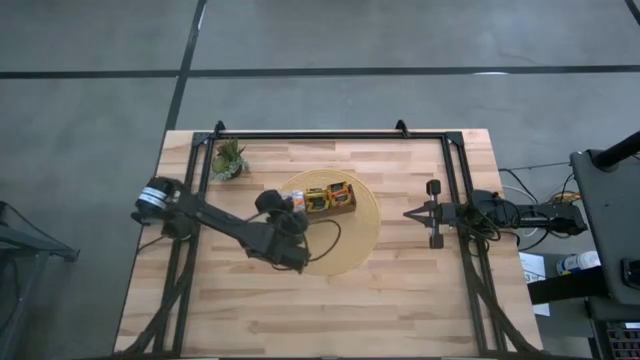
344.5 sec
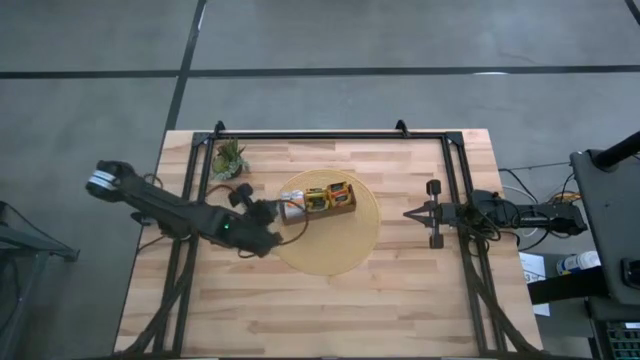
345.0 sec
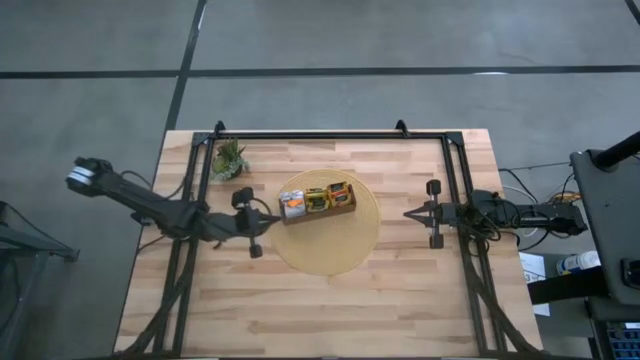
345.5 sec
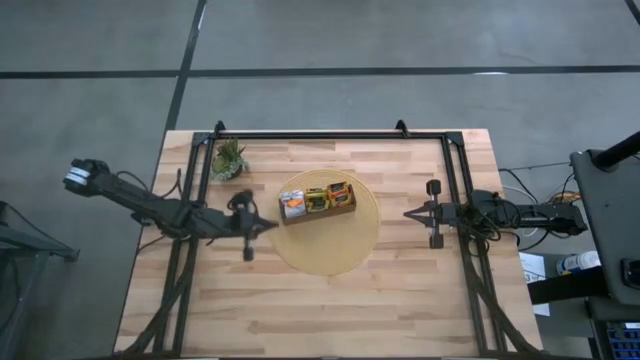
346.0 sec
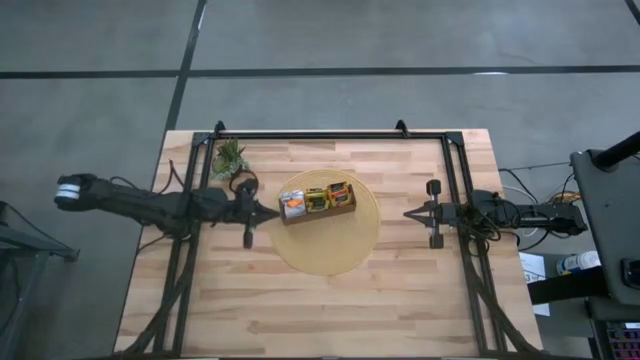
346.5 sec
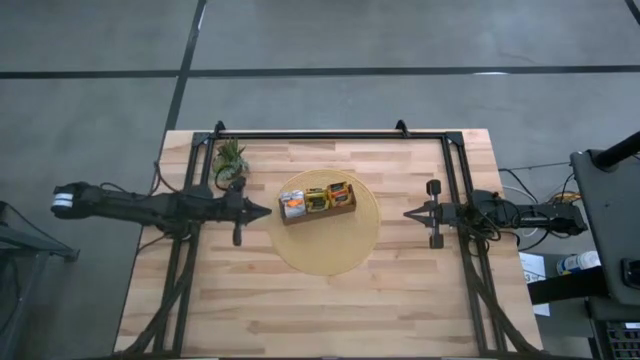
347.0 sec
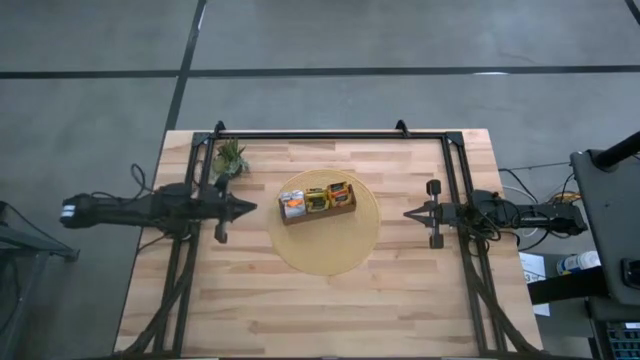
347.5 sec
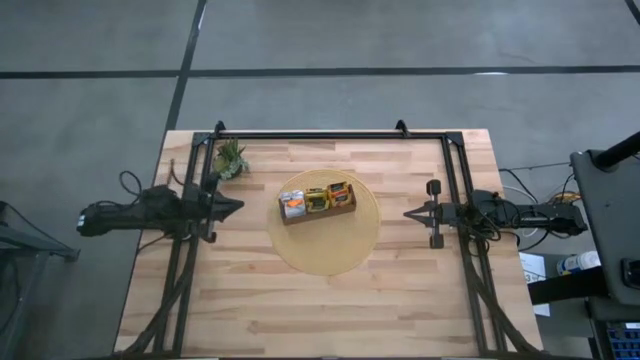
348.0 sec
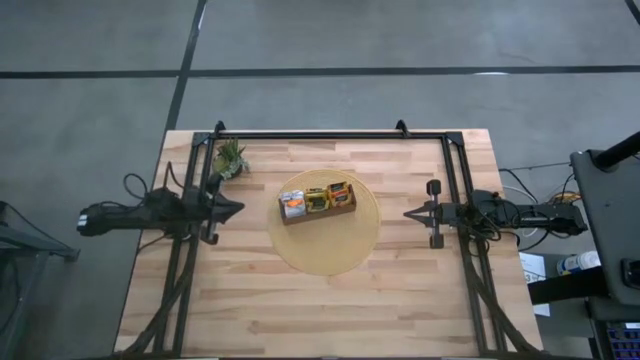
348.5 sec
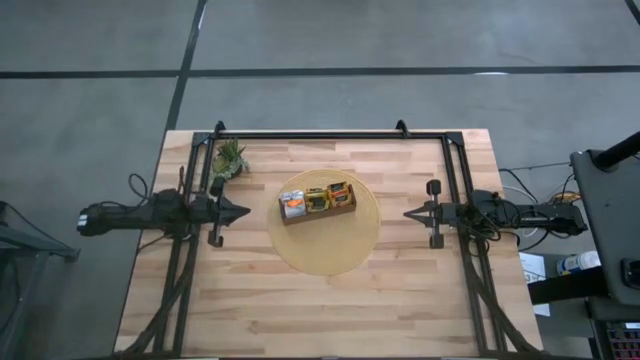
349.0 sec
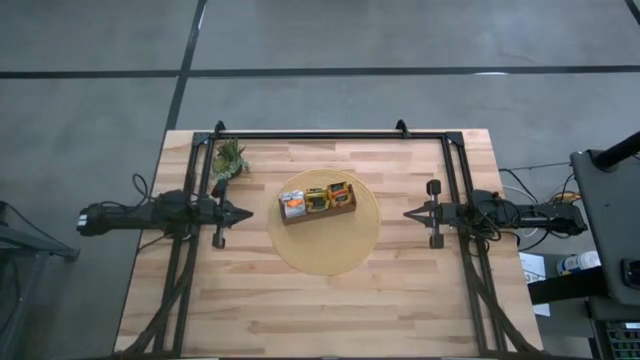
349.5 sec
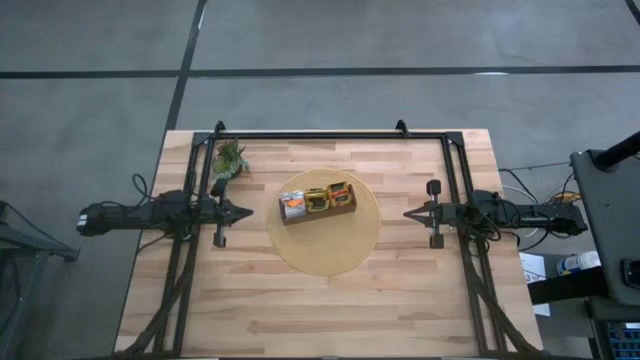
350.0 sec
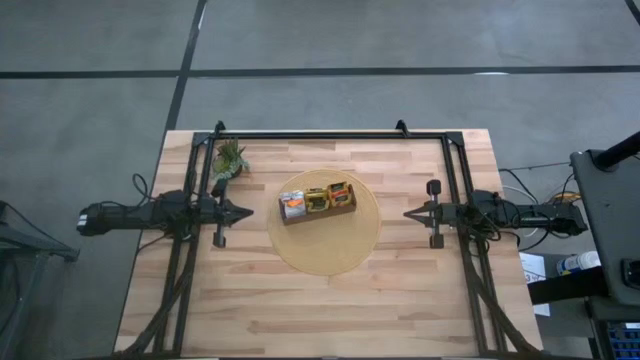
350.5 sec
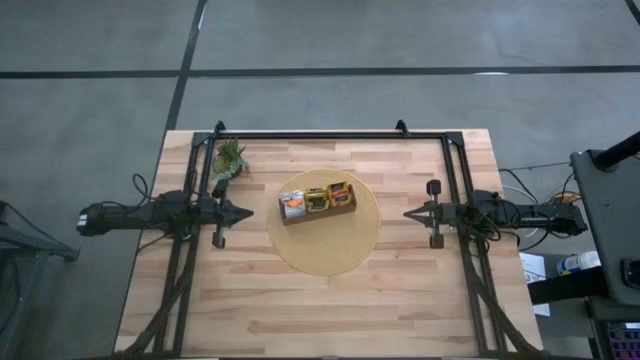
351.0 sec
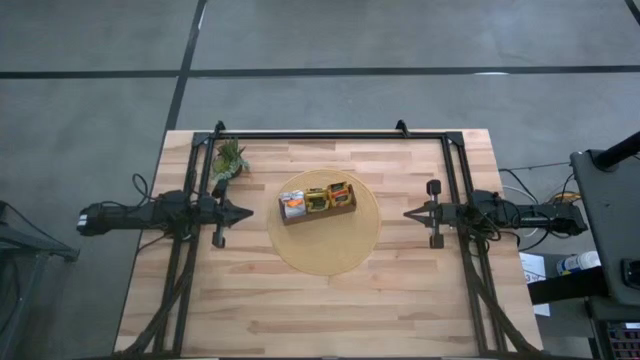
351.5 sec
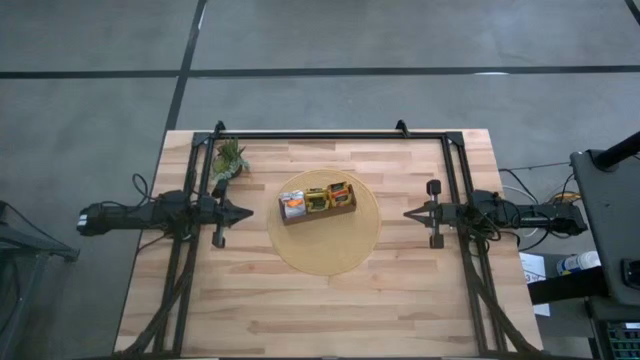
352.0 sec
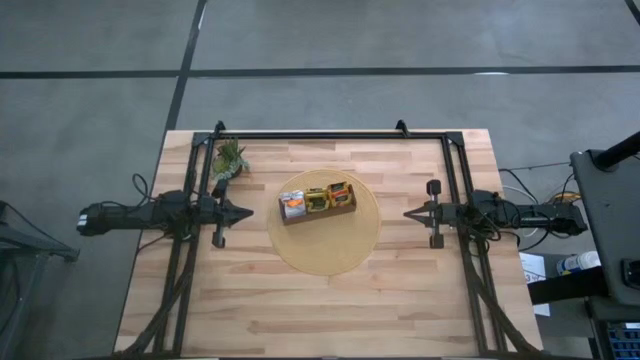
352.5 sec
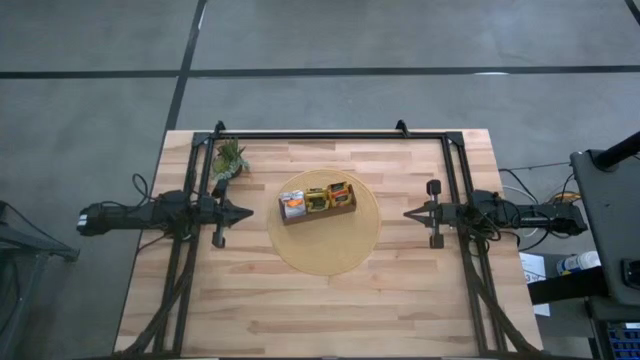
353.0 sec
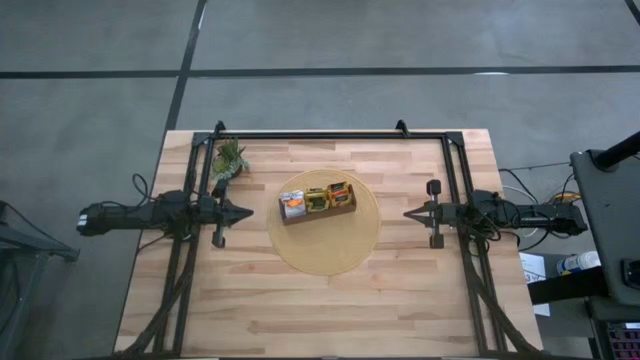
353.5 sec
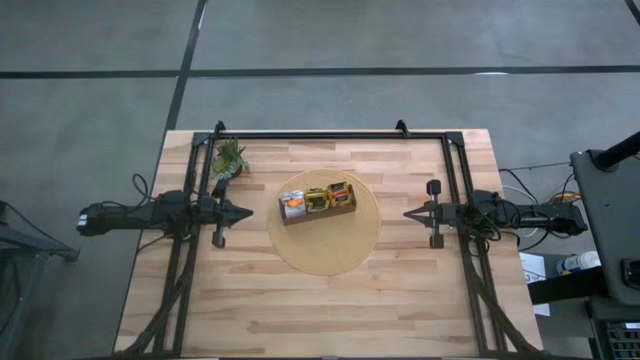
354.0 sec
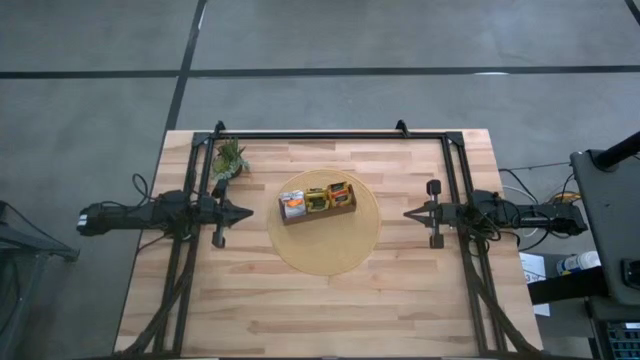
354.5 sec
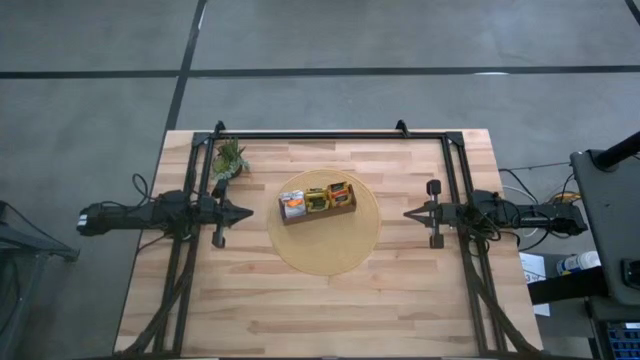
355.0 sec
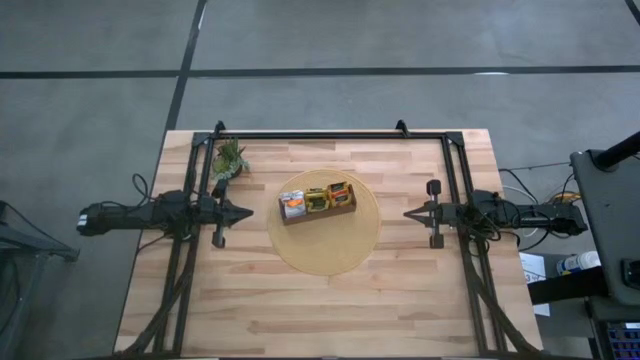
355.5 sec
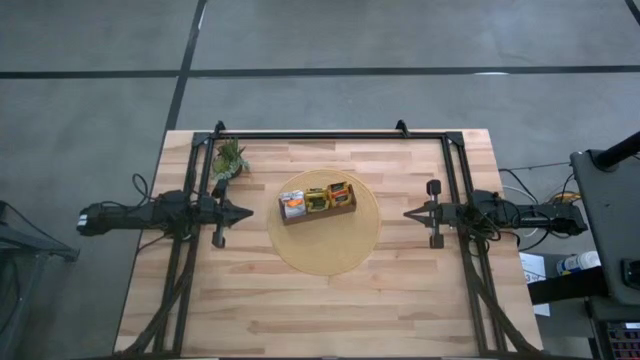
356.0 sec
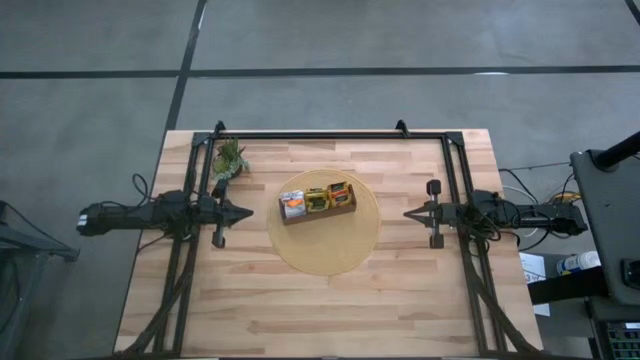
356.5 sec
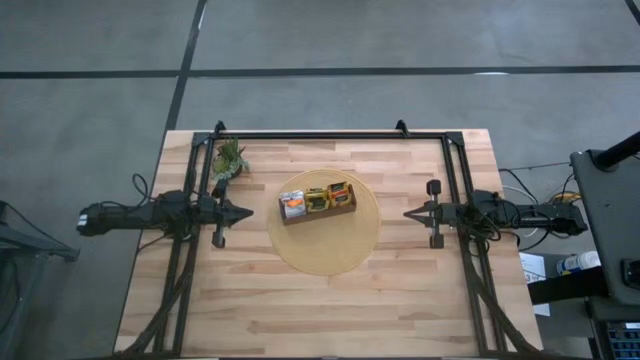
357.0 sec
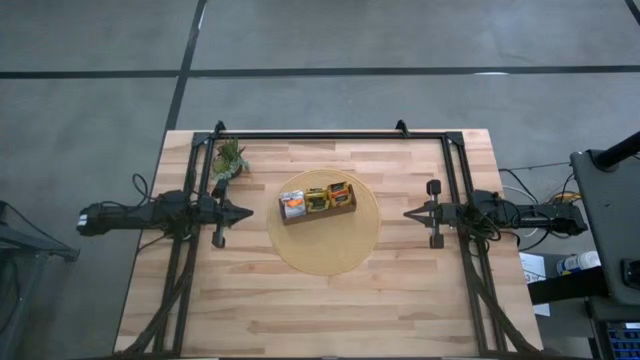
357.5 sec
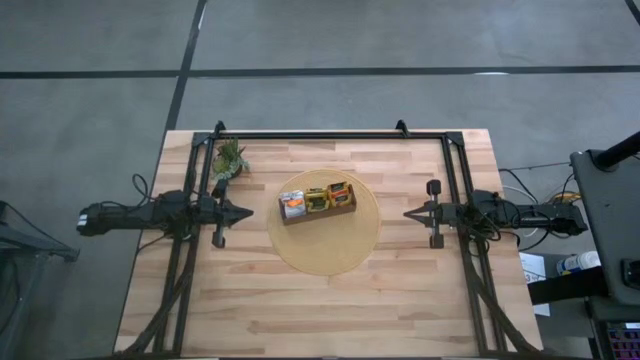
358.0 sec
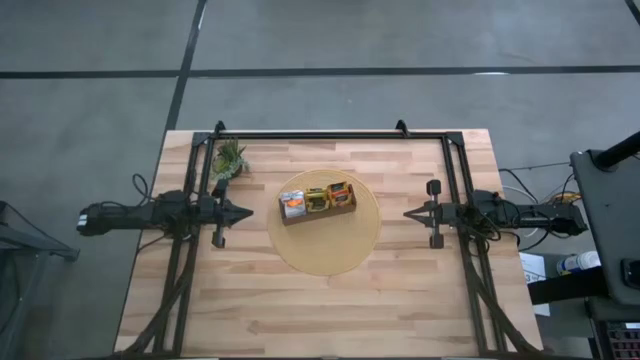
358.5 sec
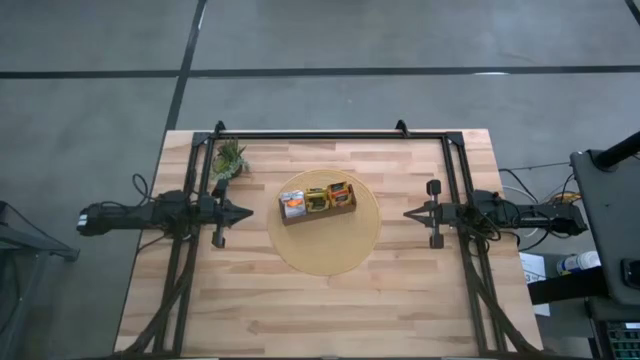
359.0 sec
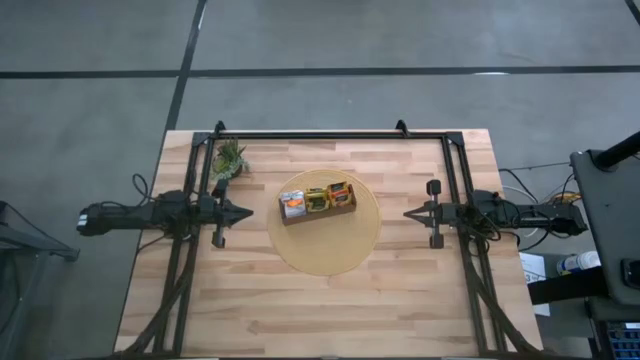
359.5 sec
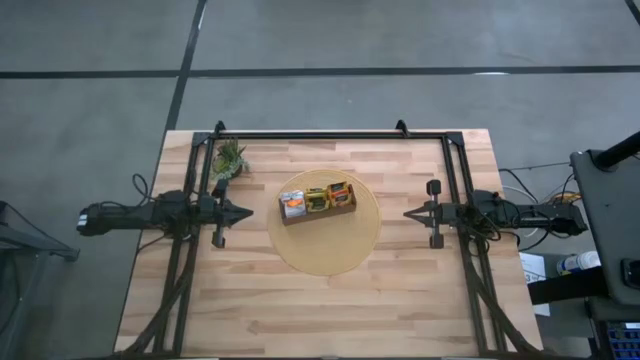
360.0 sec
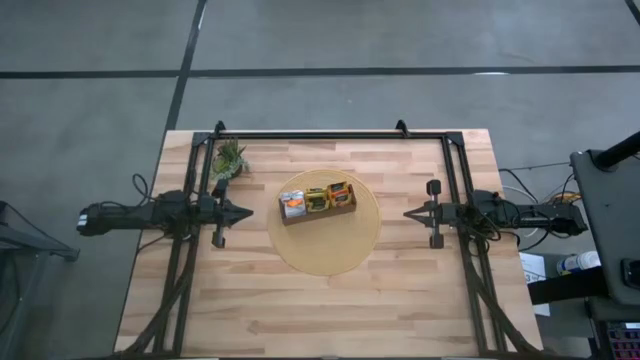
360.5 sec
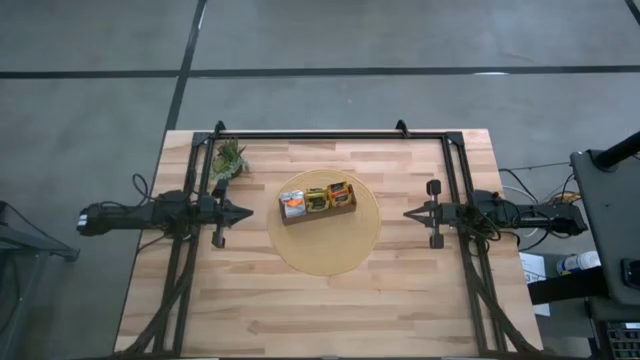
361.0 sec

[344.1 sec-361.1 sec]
Task: Pick & Place Tea
Return to Home Position

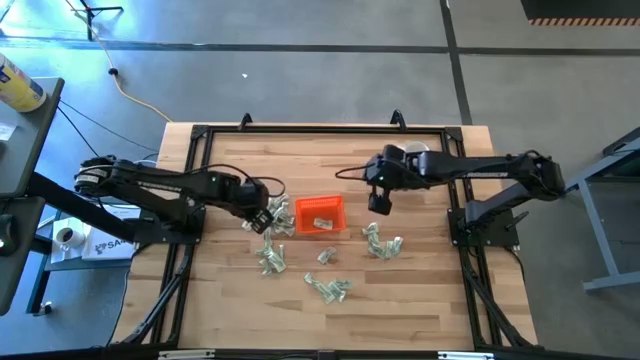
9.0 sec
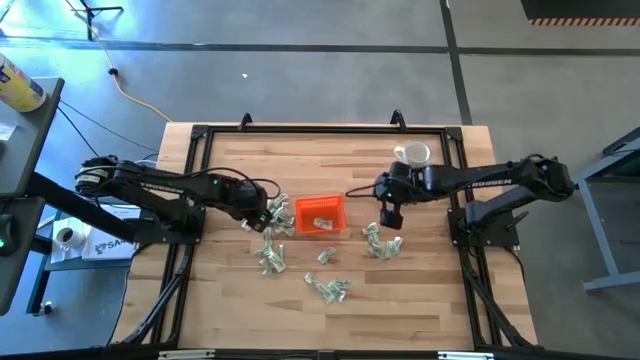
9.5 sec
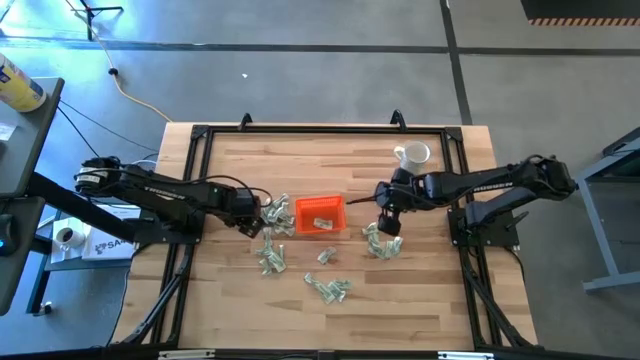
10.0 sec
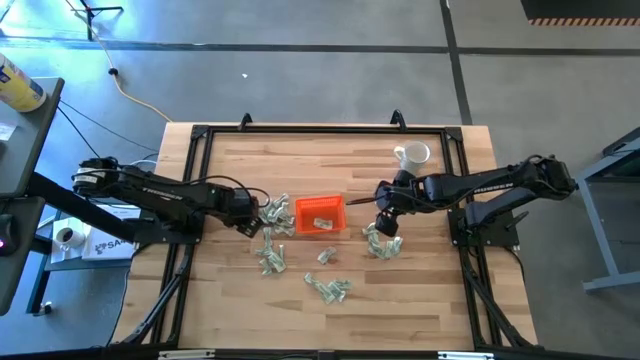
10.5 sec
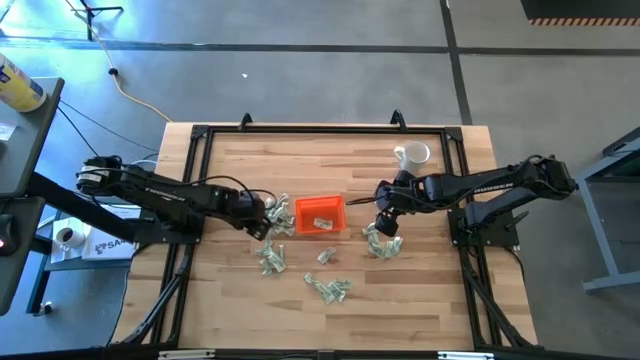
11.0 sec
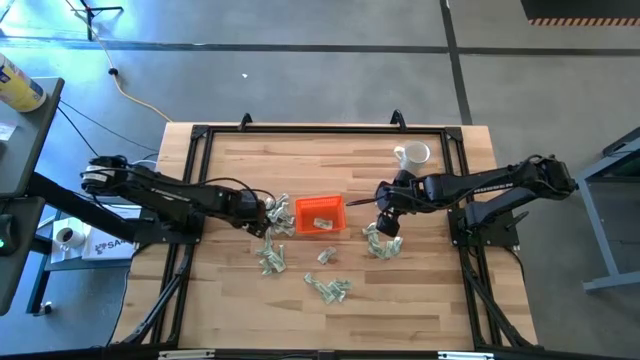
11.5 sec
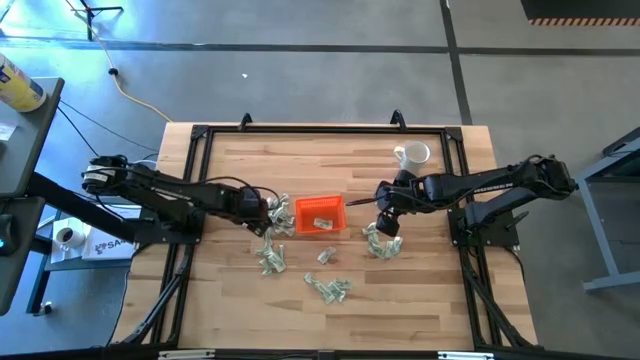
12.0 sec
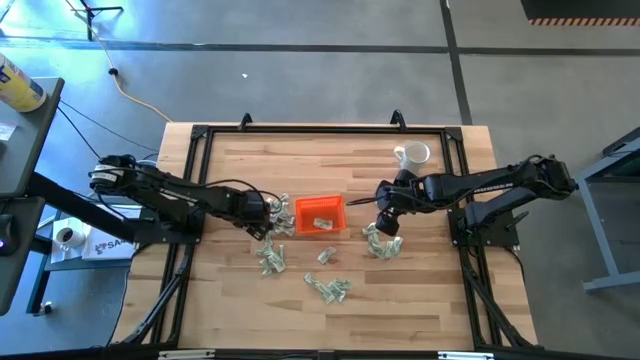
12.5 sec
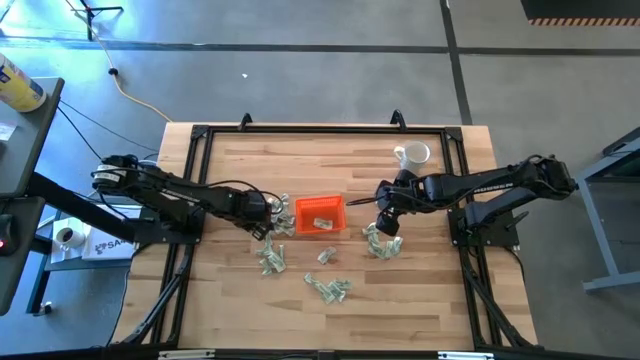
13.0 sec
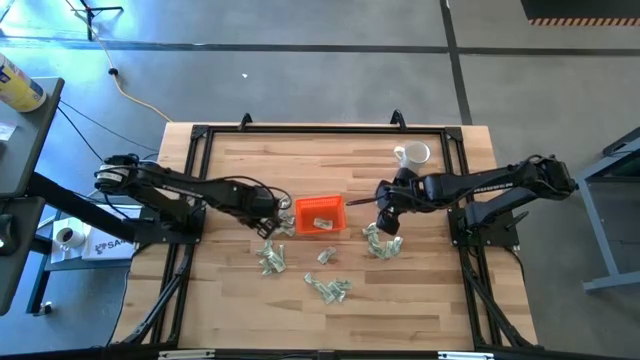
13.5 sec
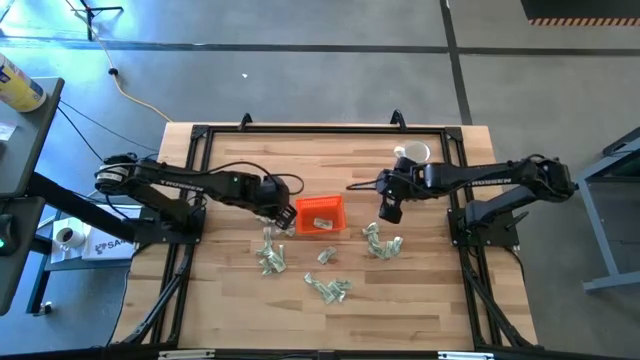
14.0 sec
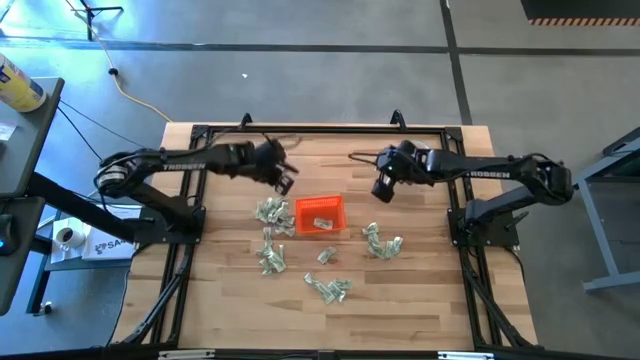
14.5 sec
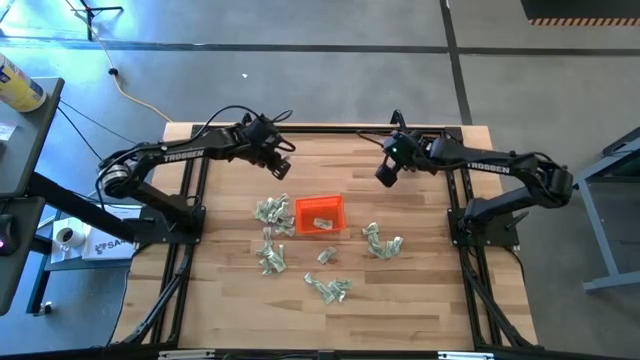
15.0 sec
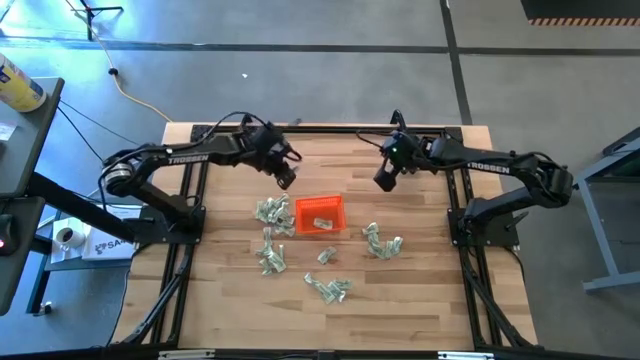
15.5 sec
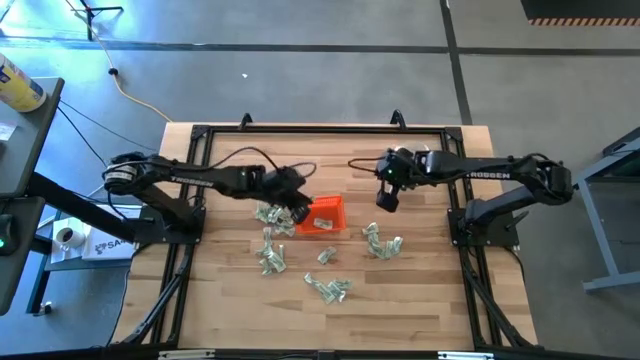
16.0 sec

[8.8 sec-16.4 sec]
Task: Pick and place Stevia / Truvia into bins
Put the stevia packet into the orange bin
